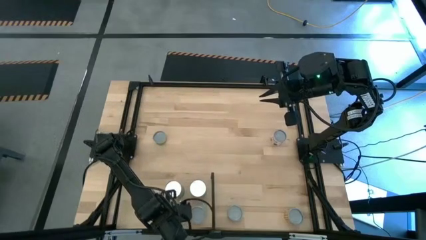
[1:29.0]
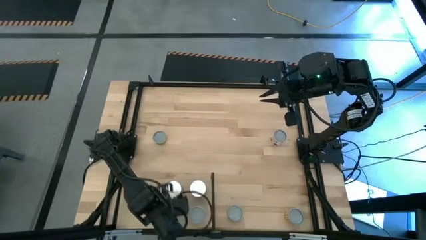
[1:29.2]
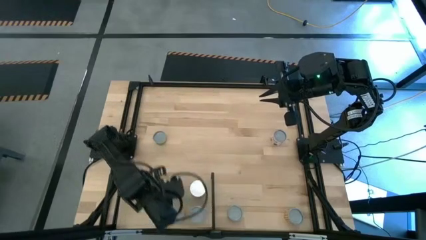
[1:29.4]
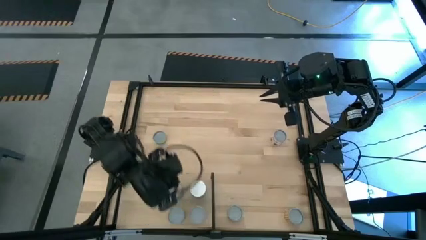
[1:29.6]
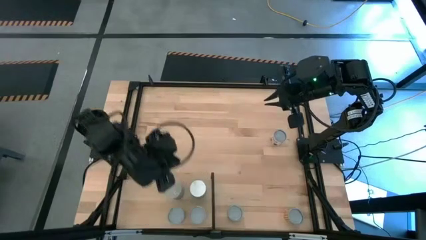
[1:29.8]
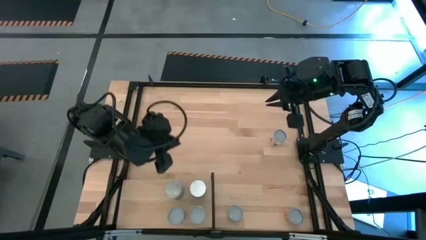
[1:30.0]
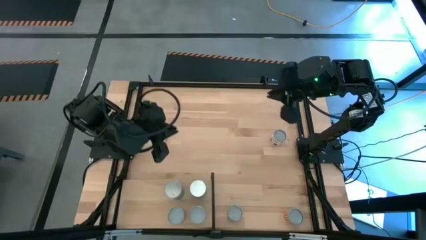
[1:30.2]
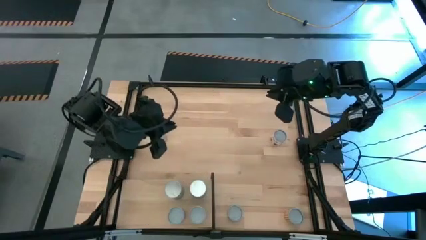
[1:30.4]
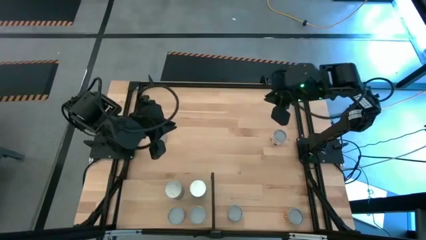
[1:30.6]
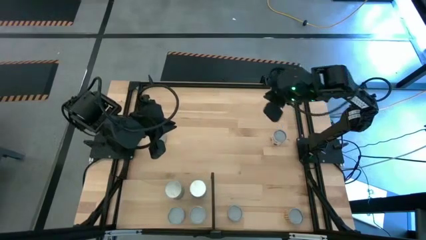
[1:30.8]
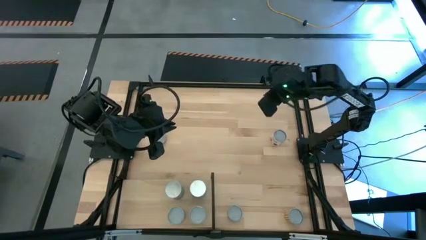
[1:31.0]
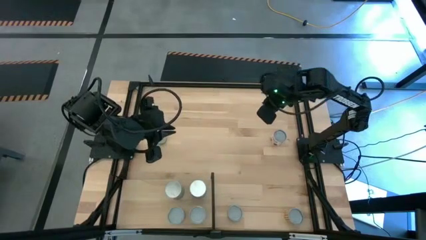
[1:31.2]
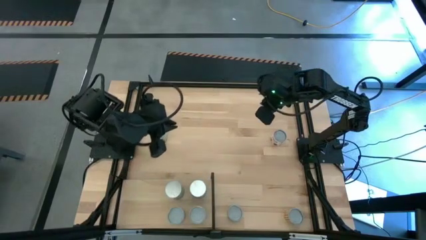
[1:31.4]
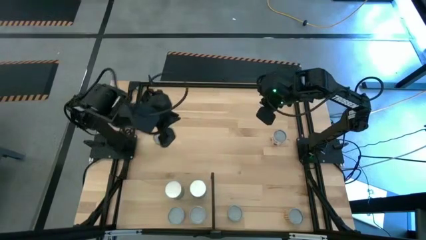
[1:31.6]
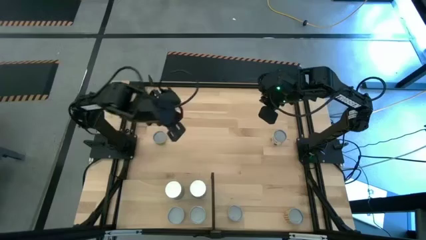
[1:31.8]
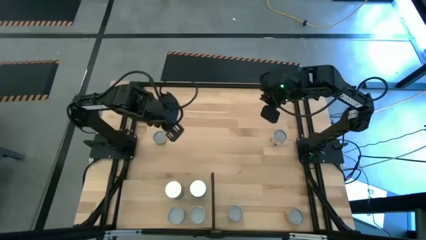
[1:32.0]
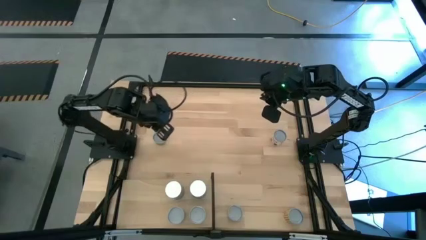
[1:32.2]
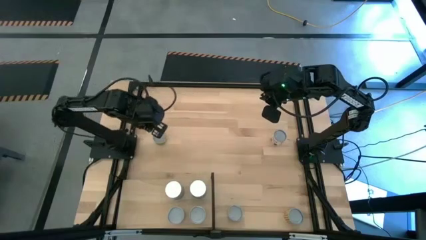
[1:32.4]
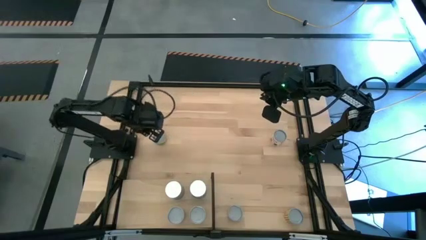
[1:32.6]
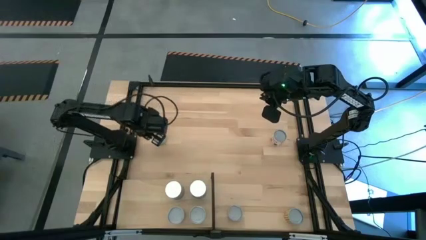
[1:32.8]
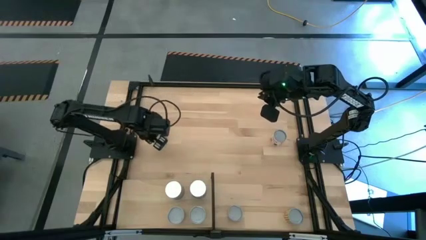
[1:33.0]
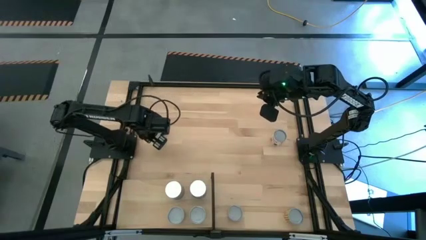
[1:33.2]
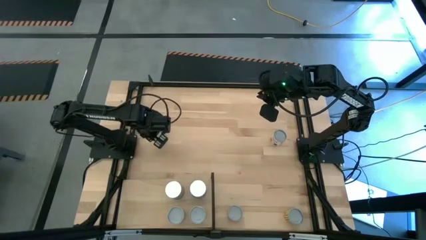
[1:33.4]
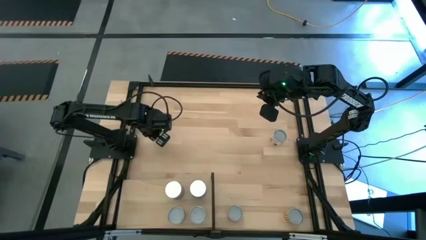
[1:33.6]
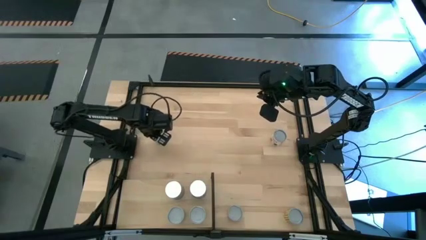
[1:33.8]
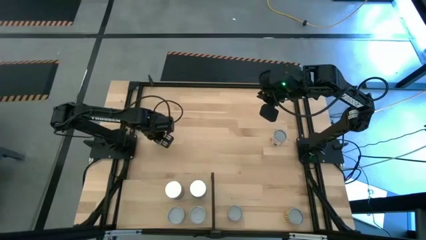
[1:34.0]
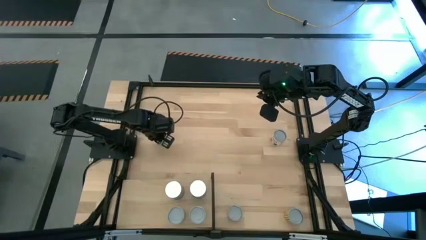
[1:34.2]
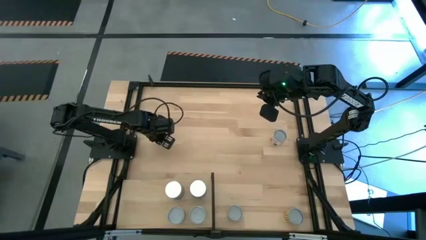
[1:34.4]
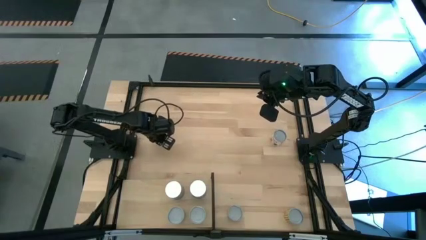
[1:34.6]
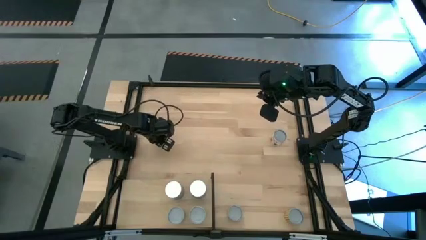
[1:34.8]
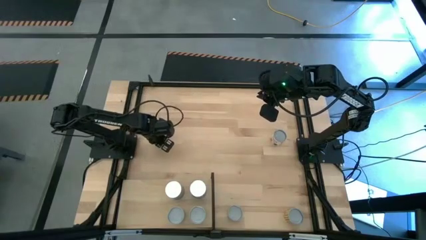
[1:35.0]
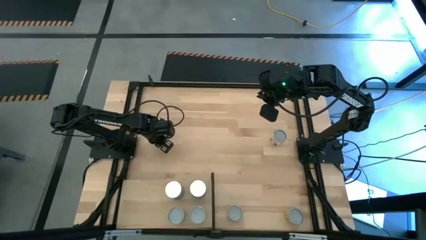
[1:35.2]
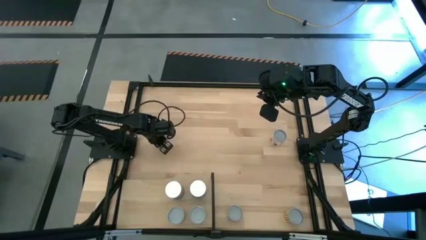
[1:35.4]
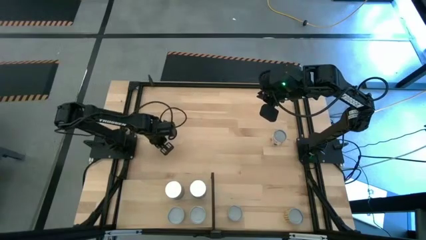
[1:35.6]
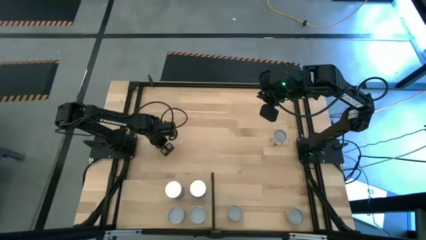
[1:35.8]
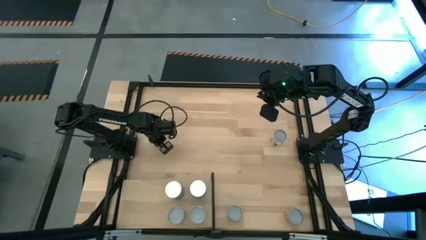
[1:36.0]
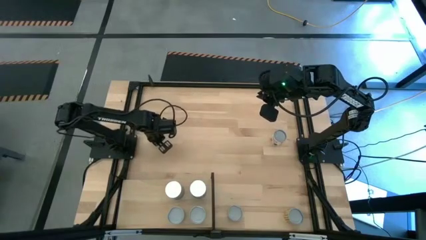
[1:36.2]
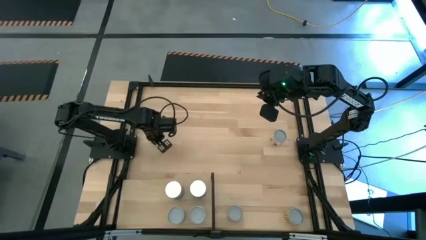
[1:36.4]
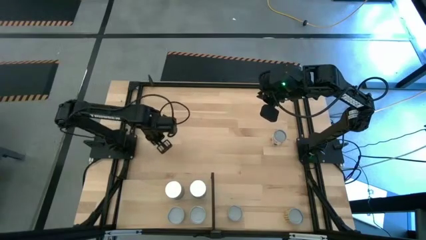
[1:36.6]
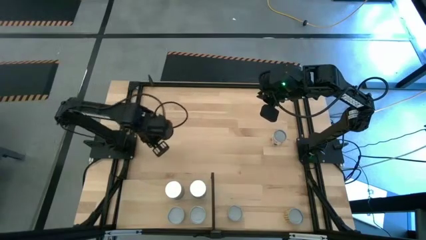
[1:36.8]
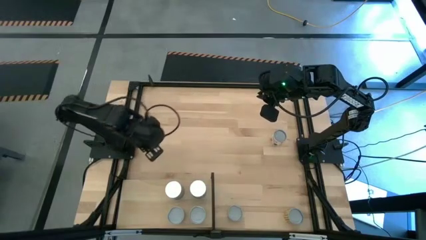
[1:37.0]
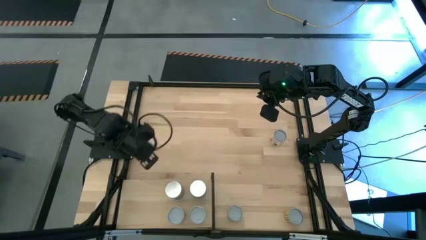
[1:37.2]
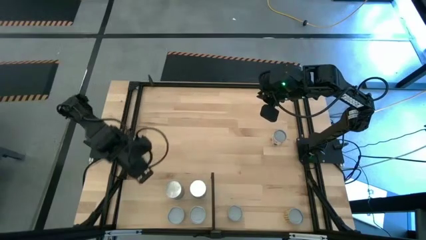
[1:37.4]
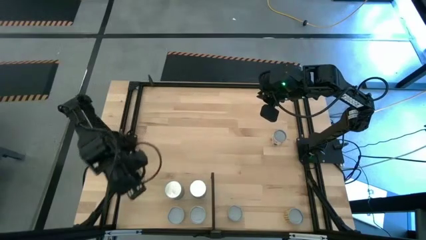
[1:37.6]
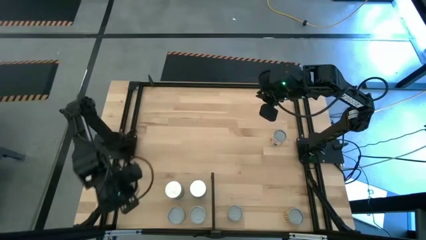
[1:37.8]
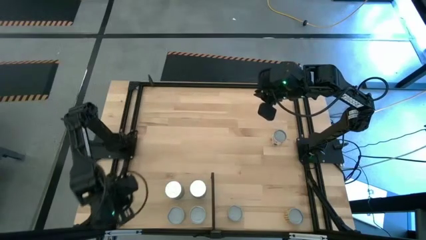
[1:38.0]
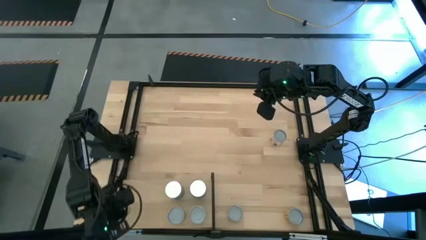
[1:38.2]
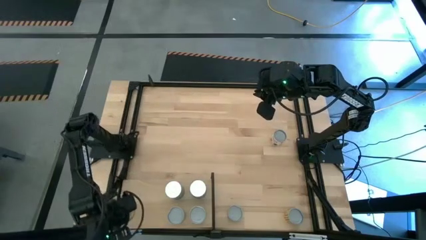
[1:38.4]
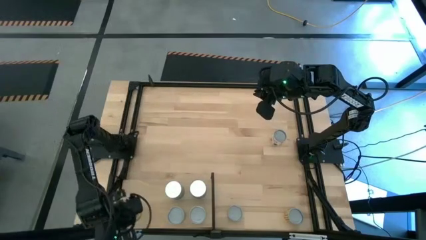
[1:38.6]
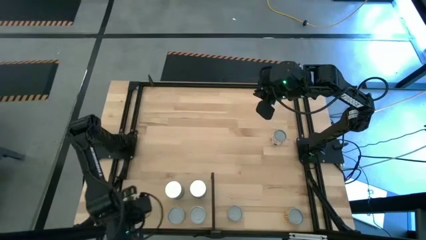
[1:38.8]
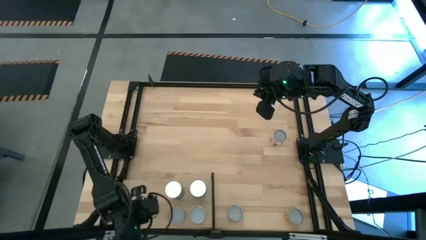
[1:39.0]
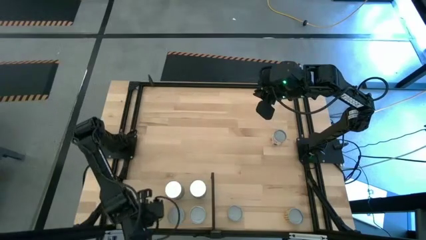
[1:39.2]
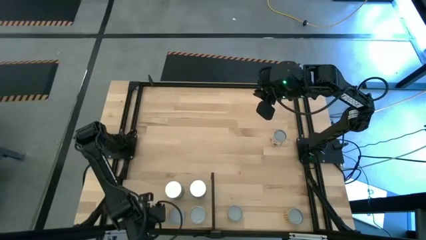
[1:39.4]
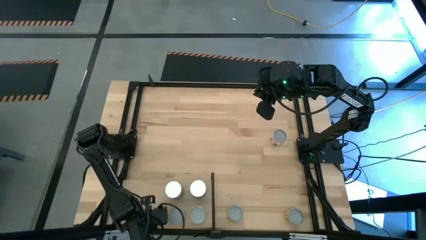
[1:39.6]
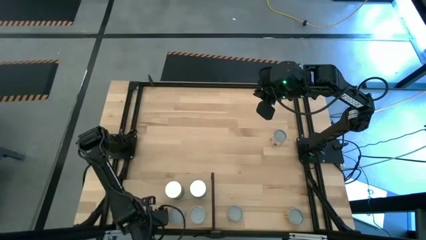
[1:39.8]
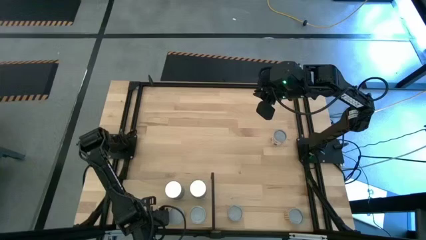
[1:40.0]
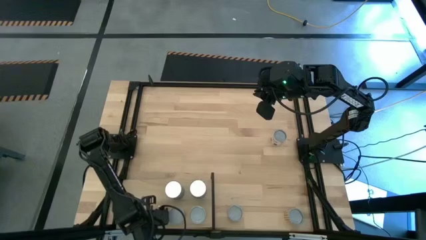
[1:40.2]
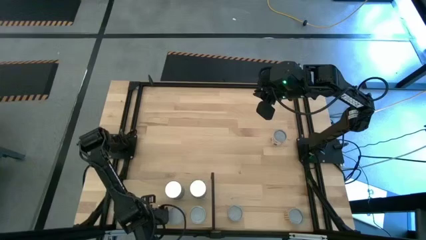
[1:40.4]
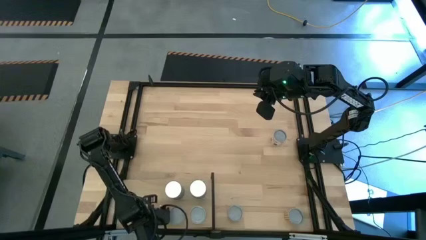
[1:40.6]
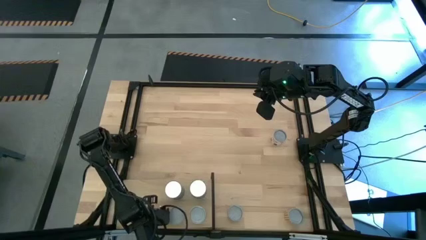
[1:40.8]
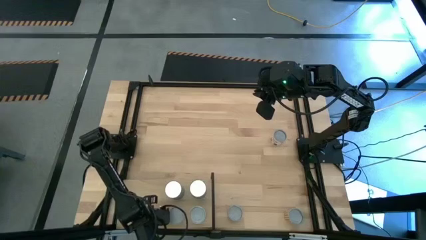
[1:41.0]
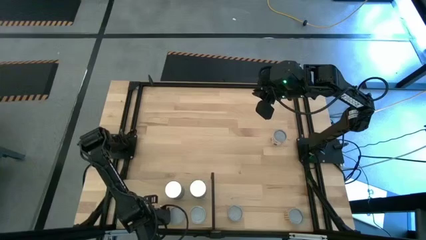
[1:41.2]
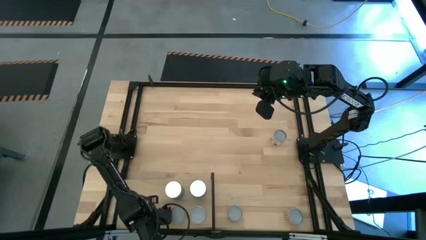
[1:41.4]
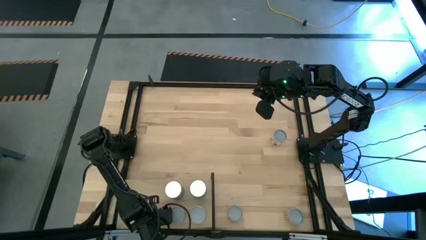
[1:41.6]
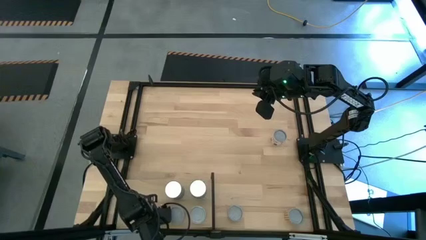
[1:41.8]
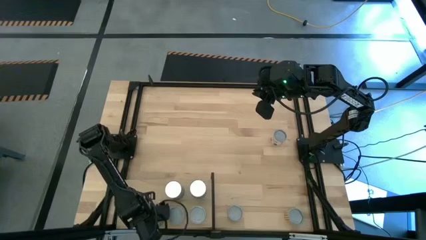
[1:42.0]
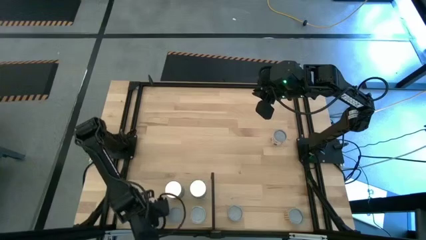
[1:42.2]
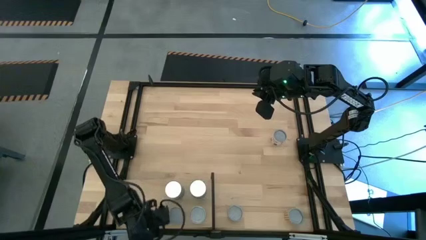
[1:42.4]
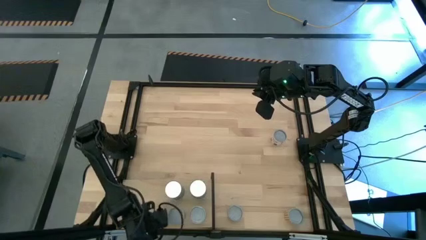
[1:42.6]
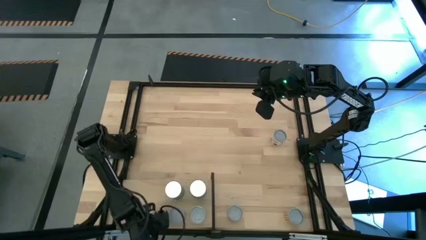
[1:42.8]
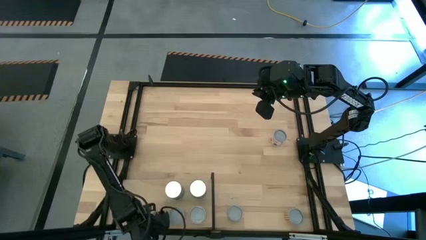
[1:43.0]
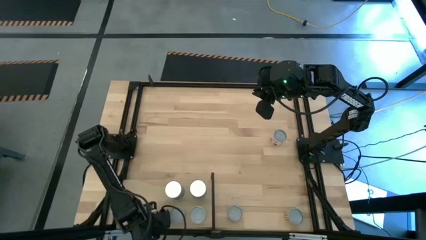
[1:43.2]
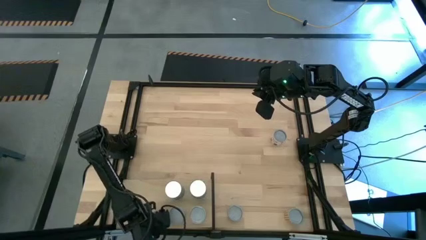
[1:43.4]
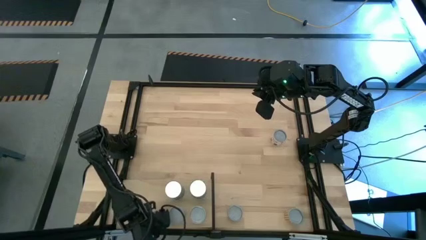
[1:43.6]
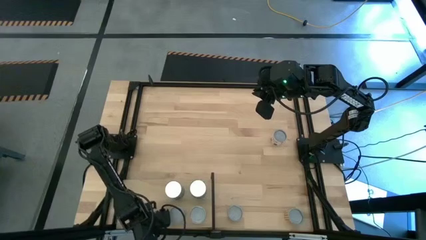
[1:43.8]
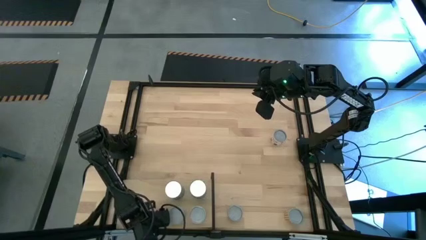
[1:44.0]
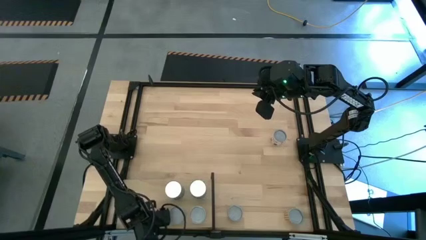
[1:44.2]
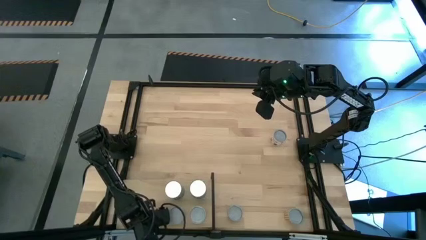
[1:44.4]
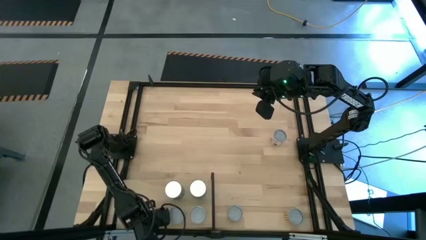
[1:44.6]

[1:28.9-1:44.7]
Task: Pick and place cans onto a shelf
Put the canned mushroom on the shelf

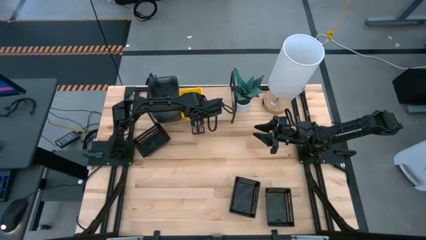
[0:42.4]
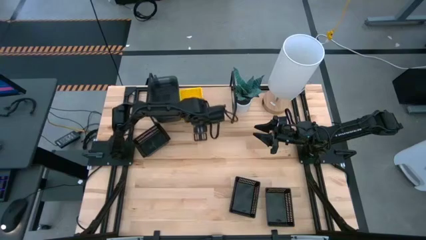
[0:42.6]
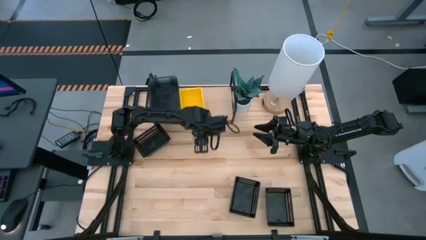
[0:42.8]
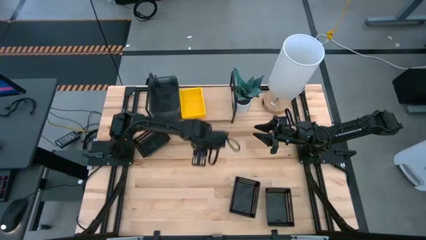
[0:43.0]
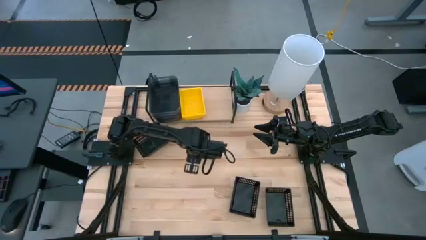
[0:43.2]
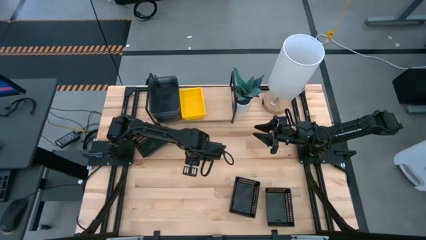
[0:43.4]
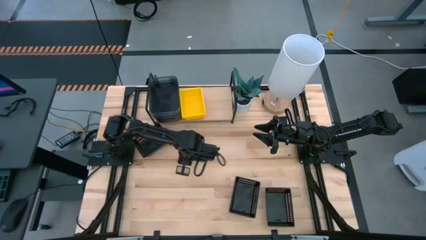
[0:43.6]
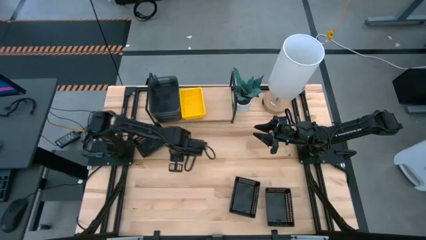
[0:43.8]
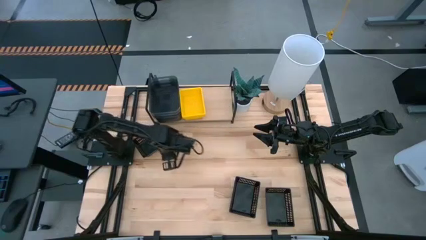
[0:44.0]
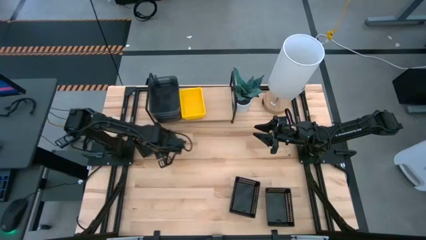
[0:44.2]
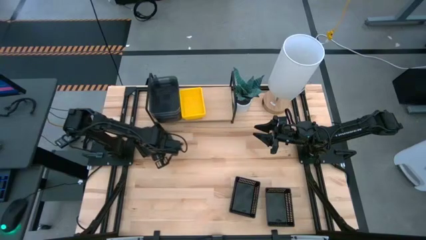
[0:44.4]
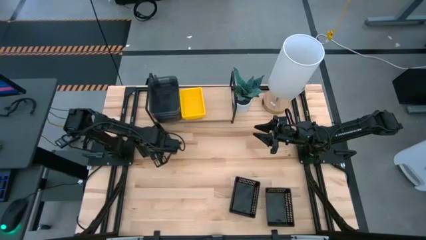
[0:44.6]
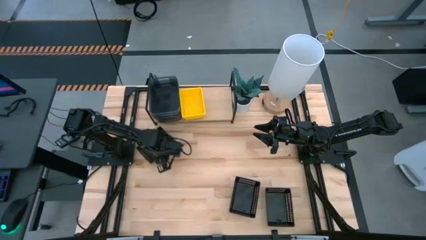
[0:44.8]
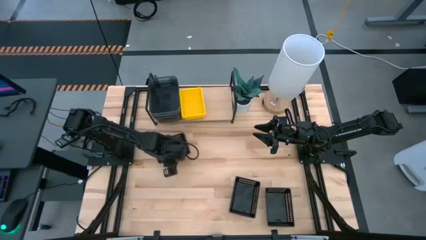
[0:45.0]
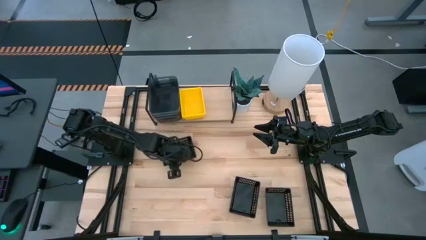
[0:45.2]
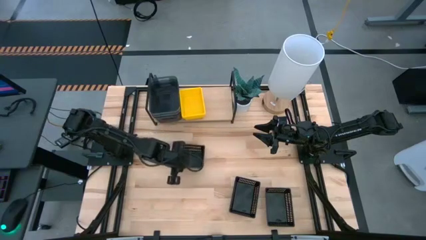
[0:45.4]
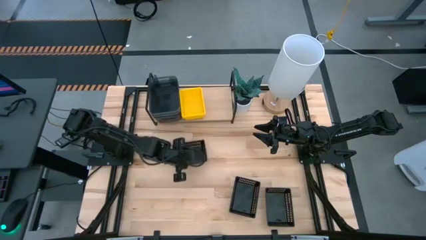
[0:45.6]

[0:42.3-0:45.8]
Task: Stack baskets on shelf by color
Move the bin from the middle left to the center of the table
